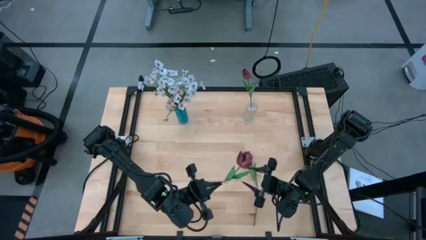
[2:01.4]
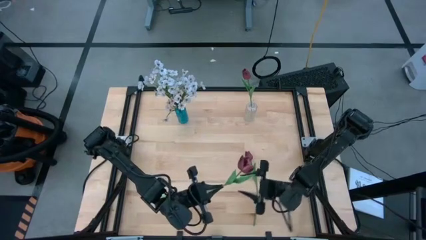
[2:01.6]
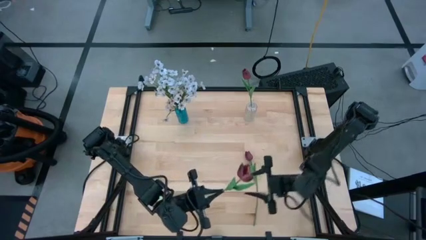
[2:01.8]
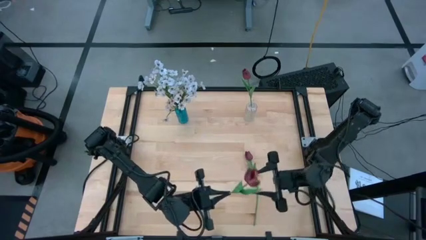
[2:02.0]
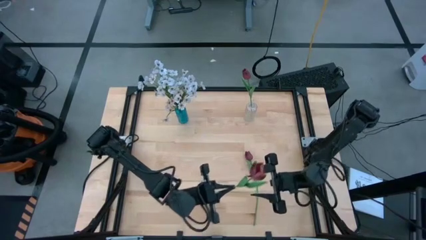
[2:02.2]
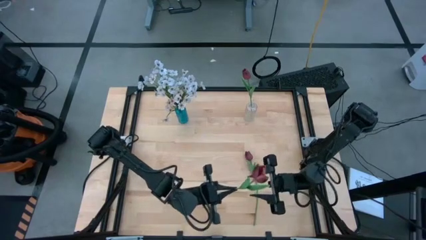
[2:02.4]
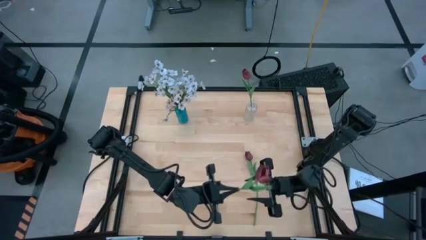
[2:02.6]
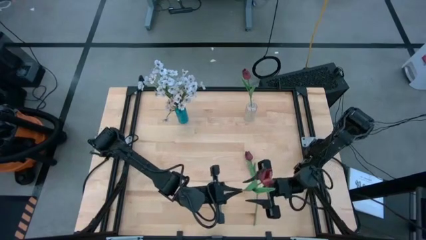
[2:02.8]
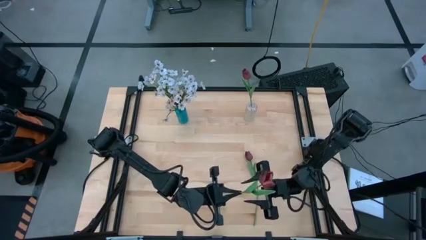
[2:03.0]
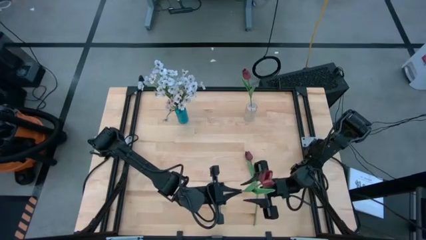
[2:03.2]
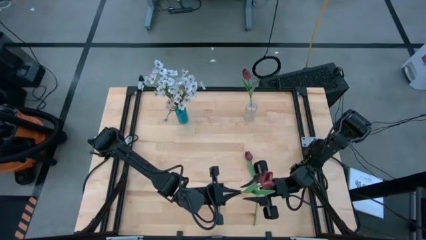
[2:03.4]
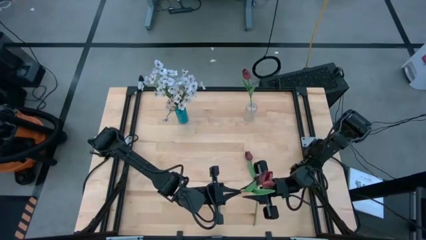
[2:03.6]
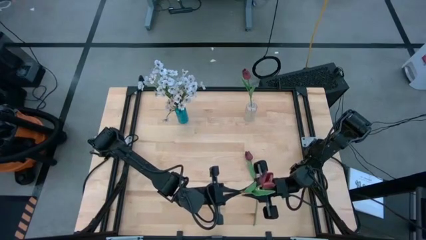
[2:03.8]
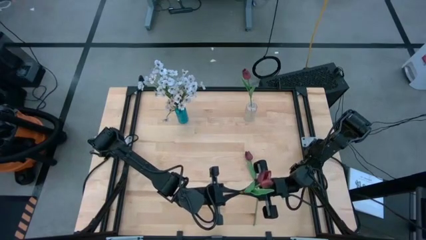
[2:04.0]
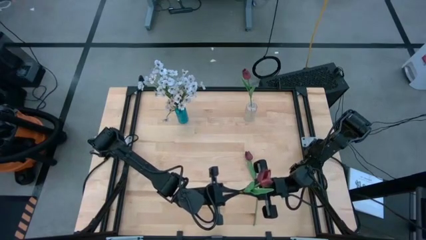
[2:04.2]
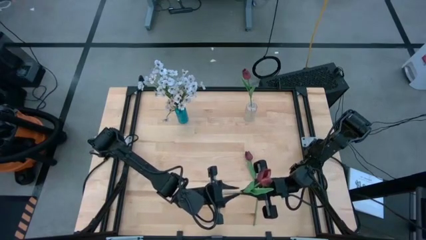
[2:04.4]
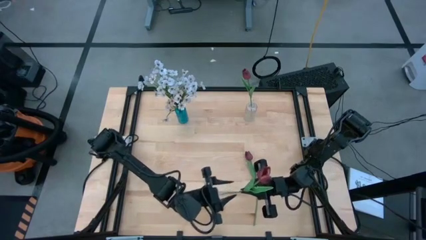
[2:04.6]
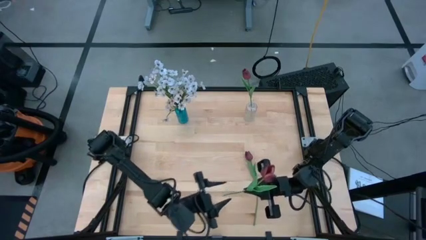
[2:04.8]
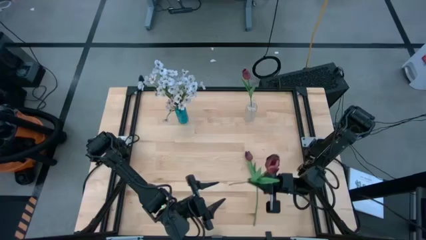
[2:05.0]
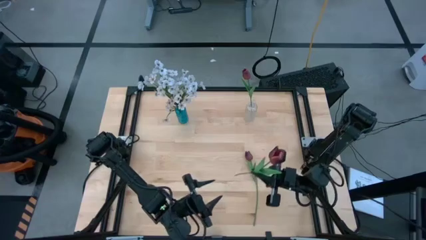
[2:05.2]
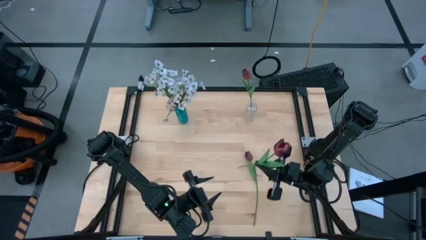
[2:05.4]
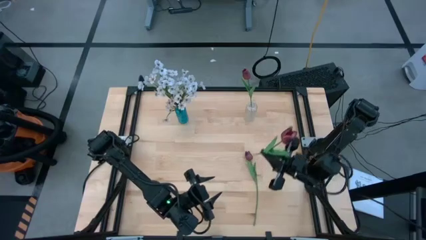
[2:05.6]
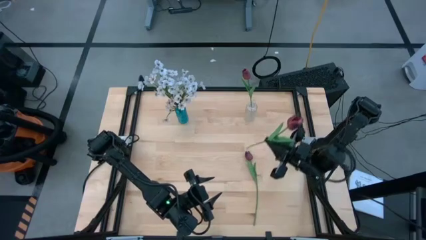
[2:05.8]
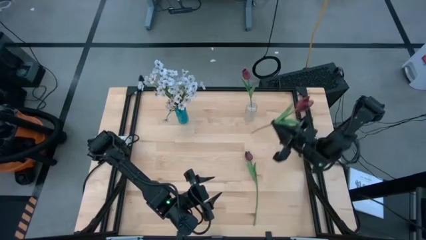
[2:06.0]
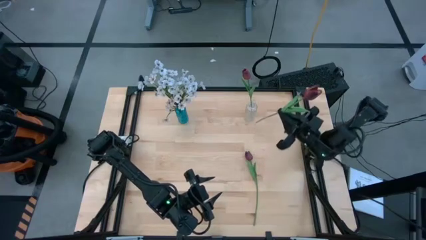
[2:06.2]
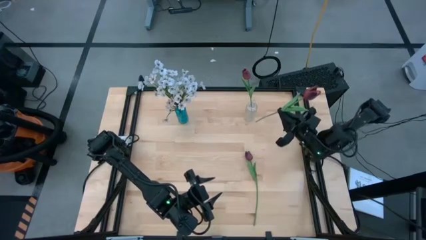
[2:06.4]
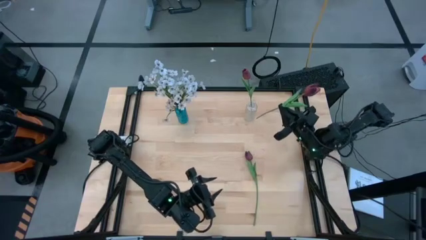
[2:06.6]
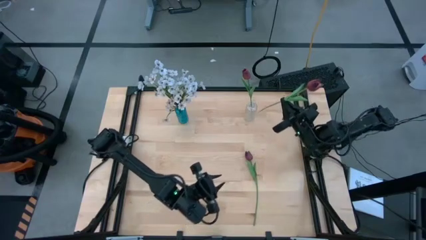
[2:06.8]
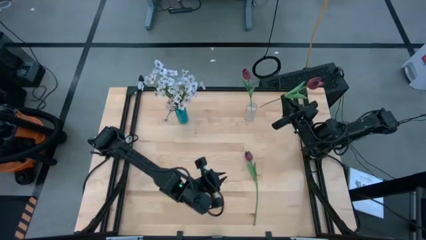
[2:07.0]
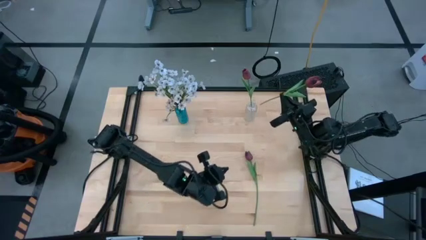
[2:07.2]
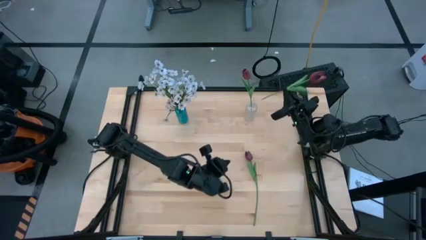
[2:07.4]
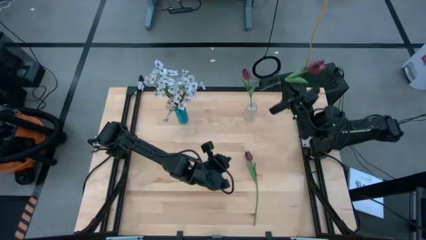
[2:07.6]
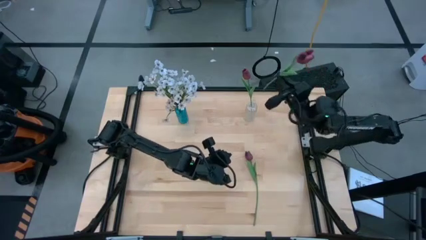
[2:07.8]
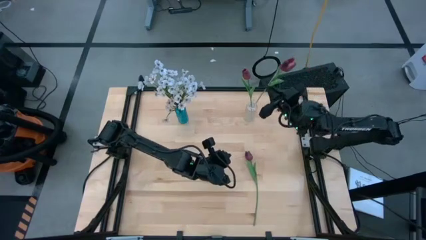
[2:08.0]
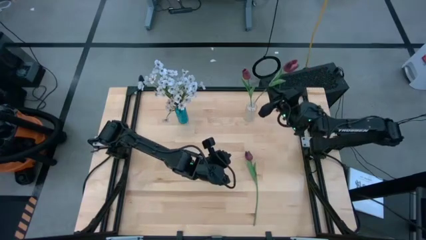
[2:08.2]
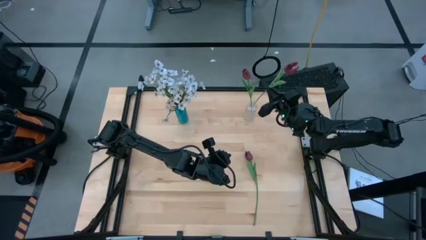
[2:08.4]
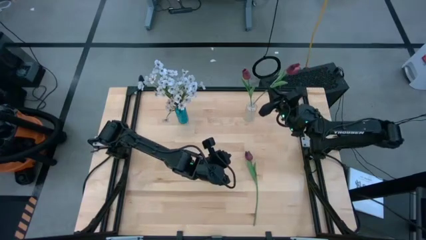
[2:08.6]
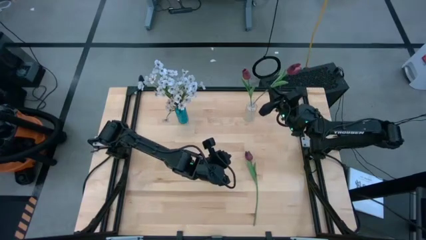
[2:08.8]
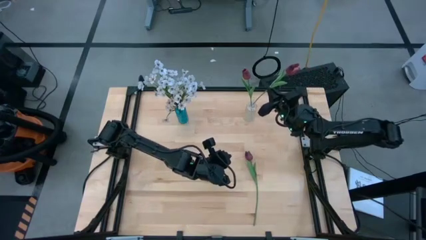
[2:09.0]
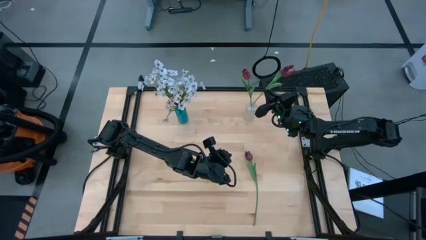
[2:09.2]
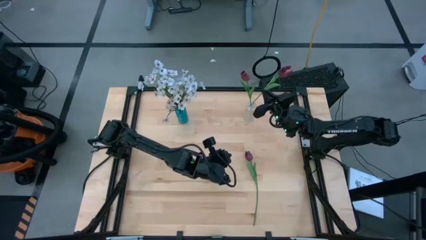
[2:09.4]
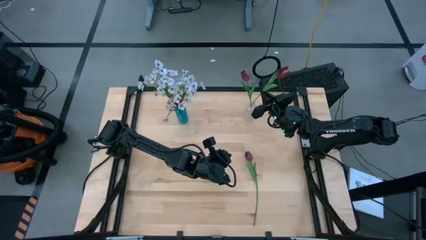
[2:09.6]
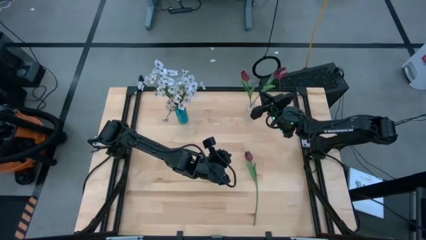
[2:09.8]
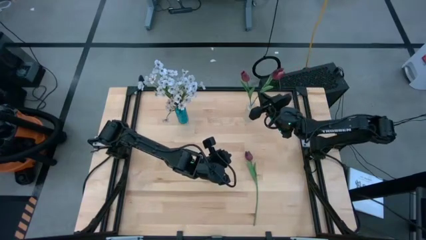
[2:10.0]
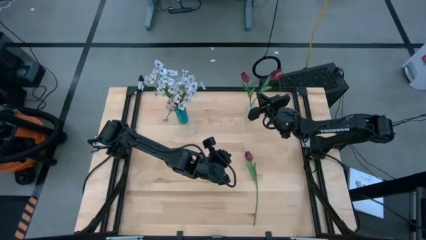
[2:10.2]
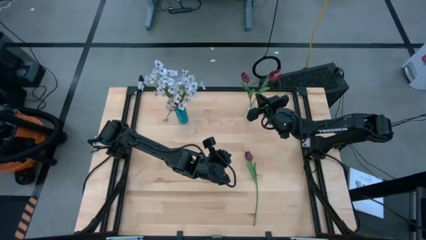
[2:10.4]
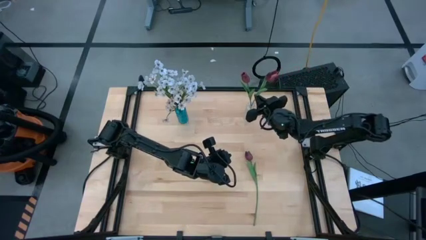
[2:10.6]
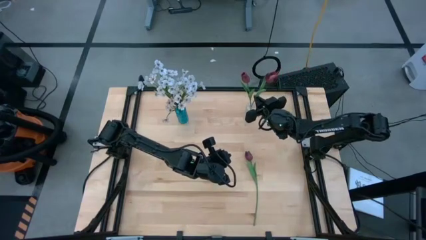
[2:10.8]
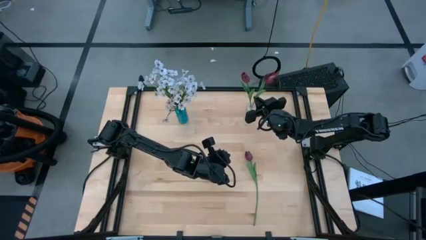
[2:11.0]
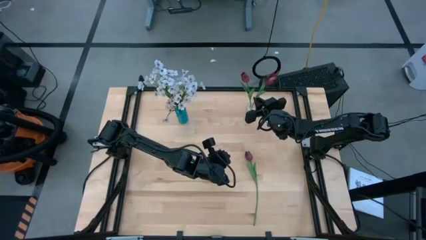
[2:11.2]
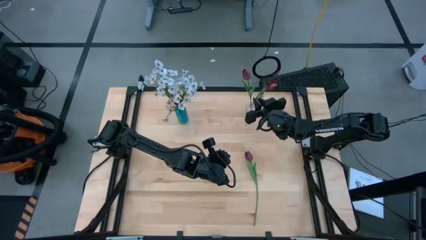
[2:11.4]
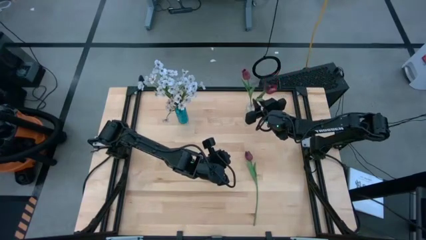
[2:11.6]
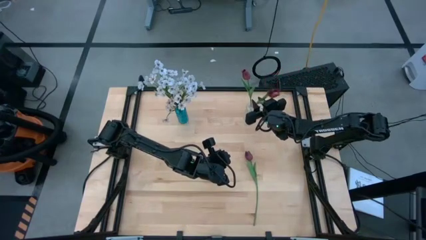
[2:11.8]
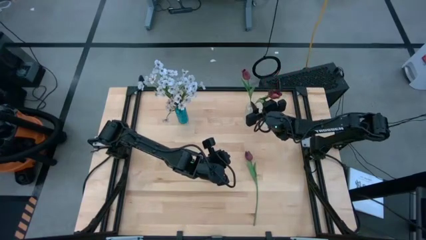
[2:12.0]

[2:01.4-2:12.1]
Task: Sort flowers into vase by color
Put the left red tulip into the transparent vase

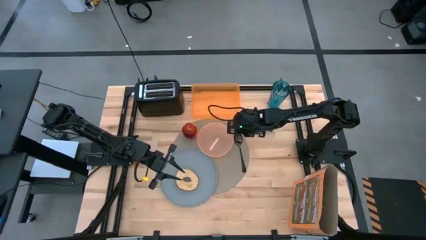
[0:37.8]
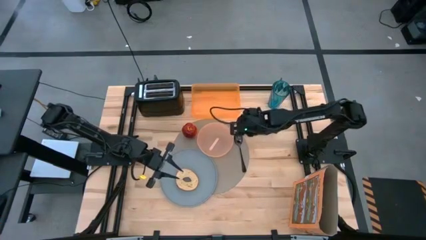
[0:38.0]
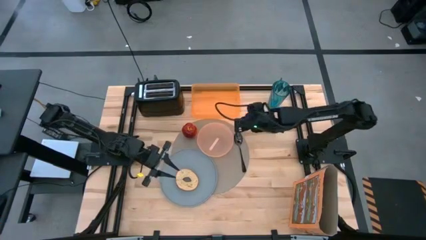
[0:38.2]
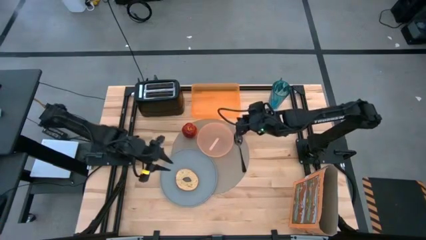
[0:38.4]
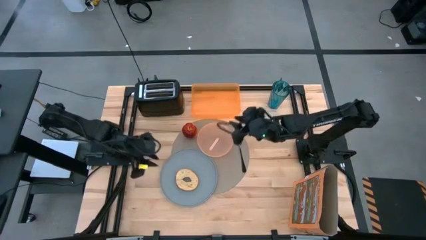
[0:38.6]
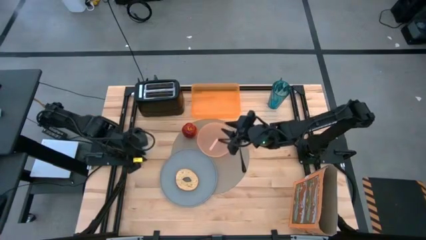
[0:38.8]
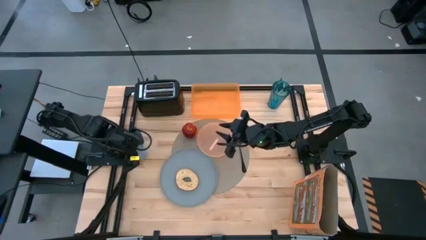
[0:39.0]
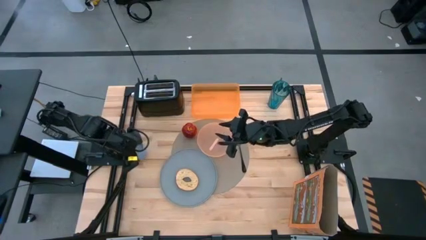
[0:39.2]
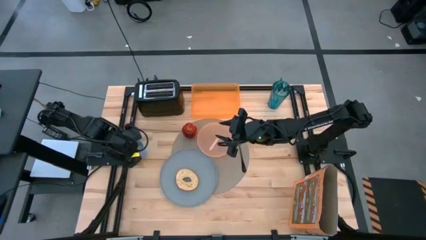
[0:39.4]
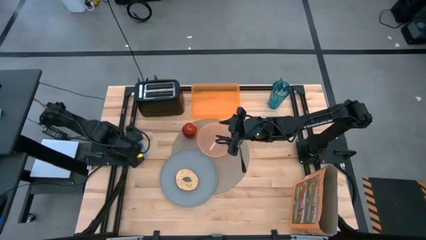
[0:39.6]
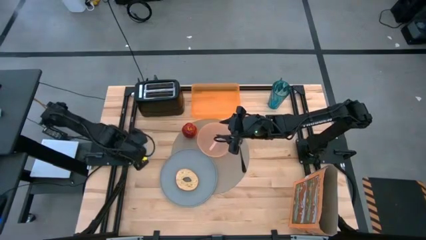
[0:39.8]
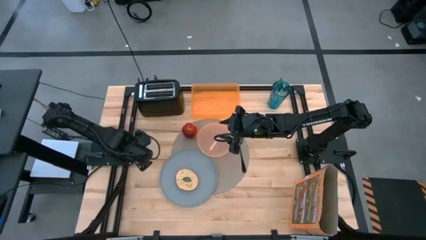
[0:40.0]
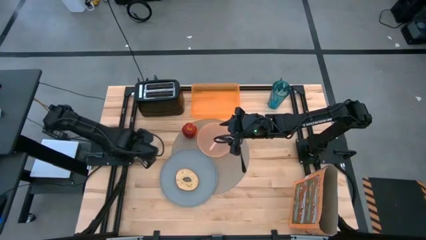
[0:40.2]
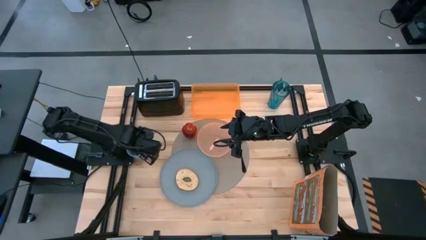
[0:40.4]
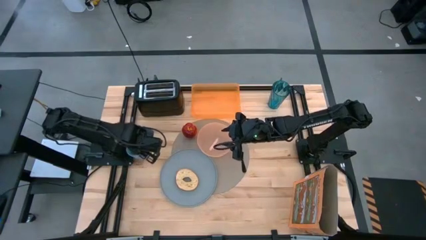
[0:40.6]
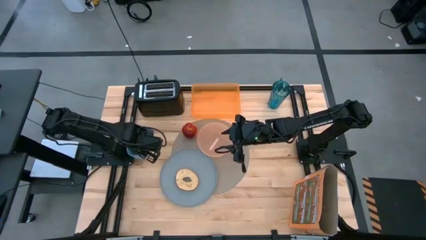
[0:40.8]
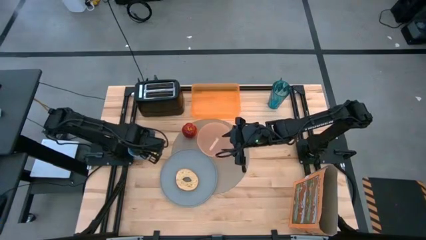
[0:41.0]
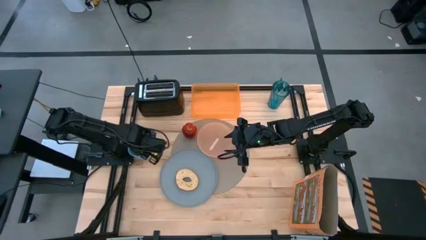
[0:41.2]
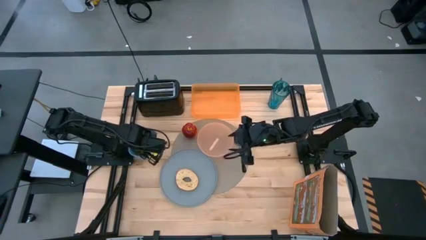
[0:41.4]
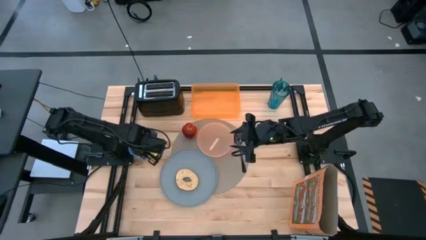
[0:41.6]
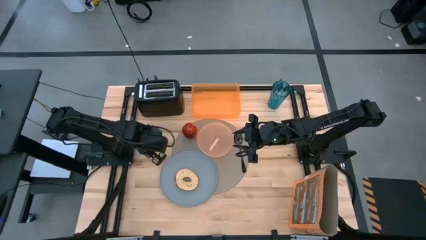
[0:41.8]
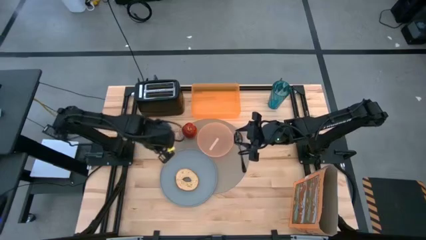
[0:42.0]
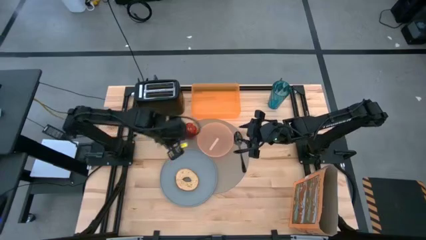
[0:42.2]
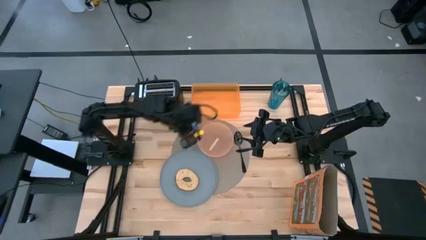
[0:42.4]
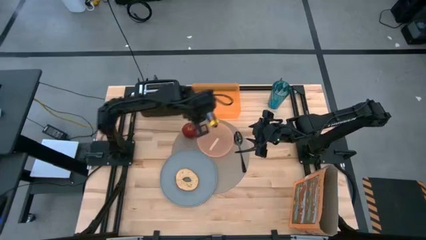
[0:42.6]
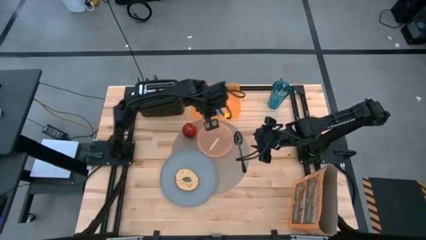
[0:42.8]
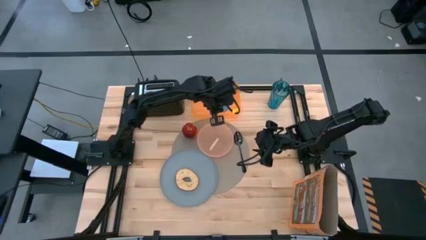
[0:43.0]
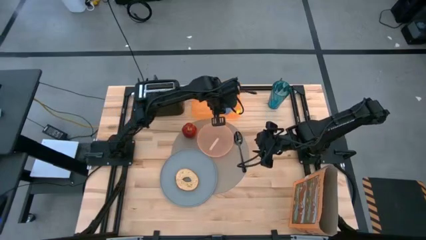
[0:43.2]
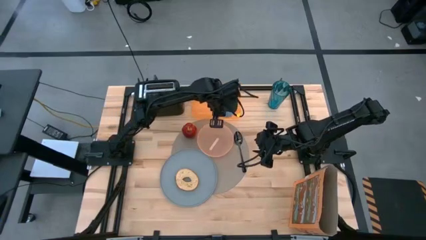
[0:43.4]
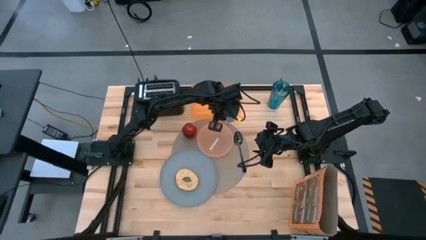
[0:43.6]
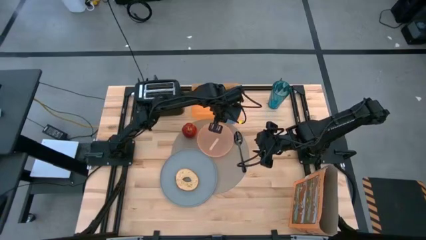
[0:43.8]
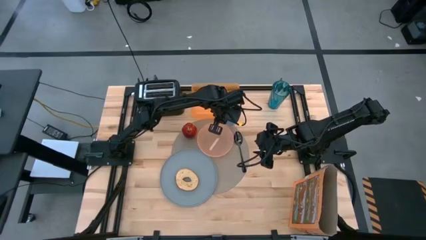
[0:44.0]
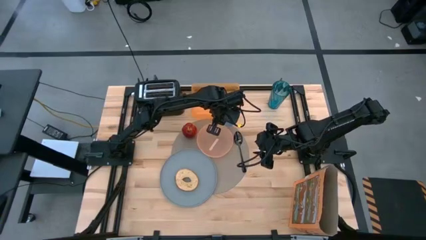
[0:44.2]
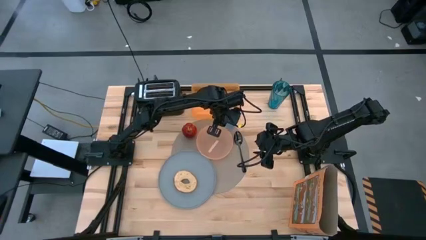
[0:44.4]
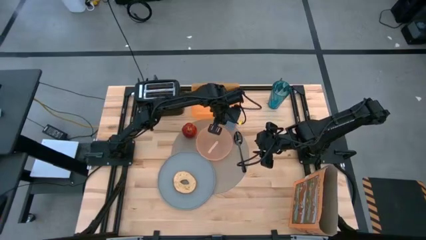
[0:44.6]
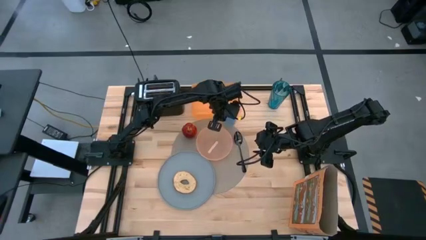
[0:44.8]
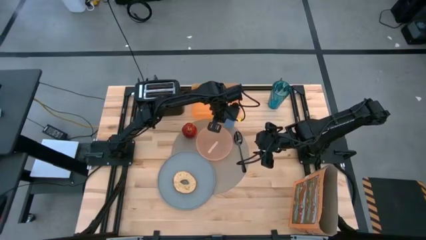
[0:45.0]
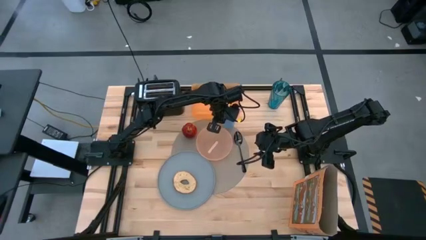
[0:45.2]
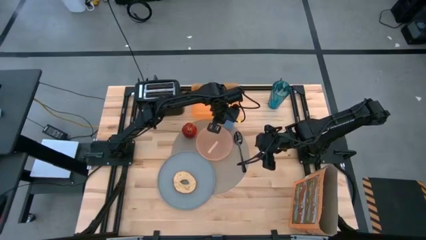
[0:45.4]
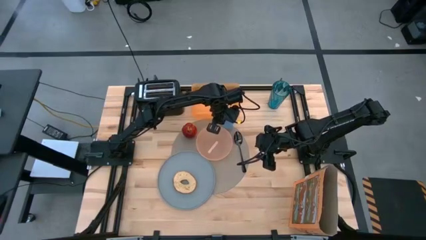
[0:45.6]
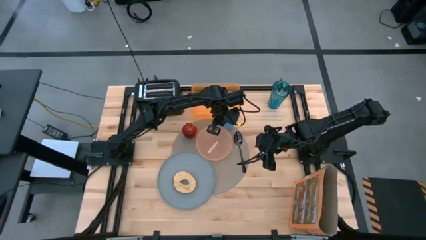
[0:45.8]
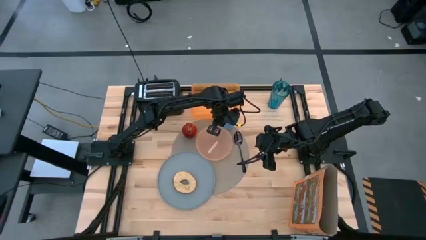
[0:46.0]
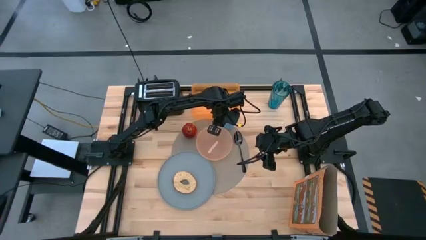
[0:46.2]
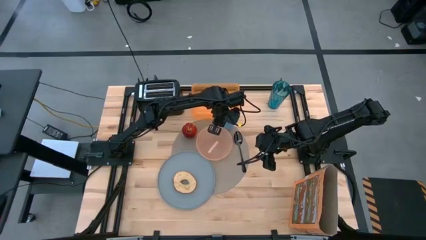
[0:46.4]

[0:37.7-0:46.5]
Task: Arrange a breakfast setting
Put the light blue cup on the gray mat
